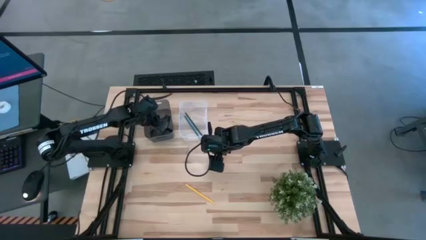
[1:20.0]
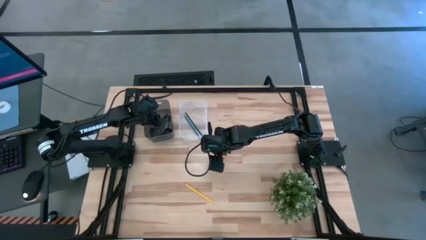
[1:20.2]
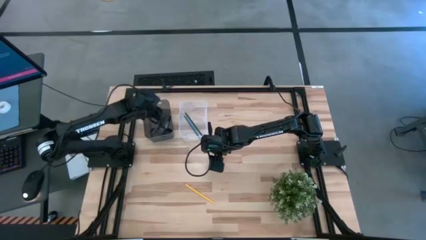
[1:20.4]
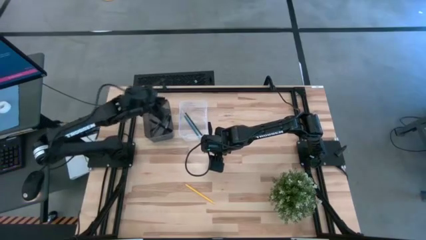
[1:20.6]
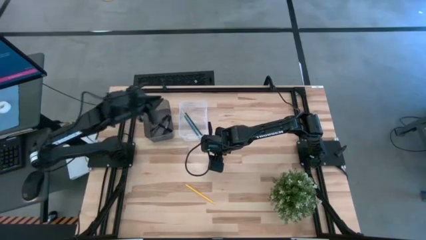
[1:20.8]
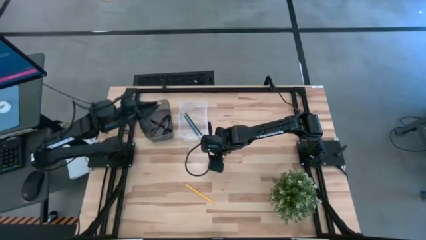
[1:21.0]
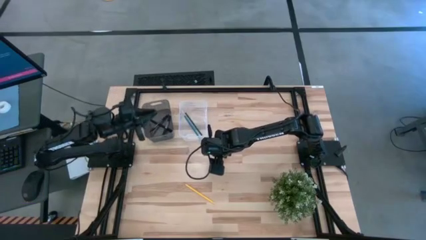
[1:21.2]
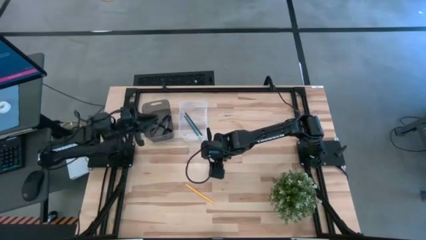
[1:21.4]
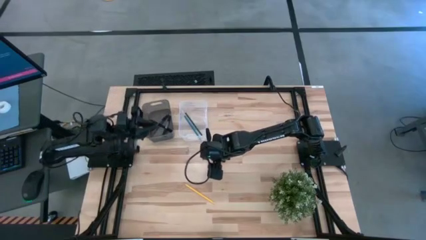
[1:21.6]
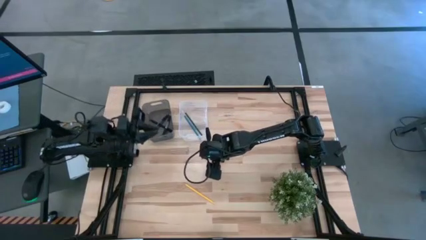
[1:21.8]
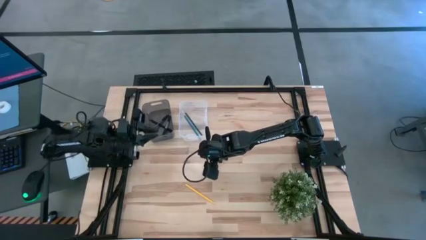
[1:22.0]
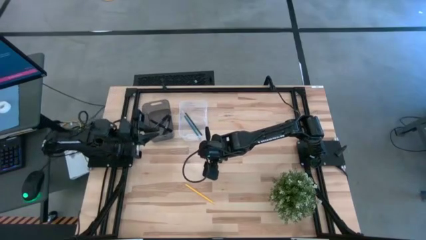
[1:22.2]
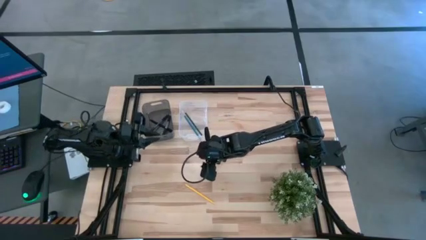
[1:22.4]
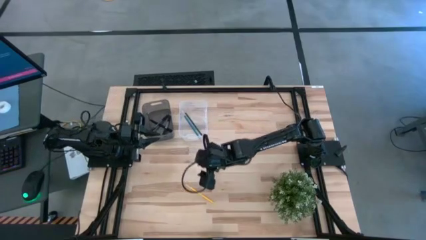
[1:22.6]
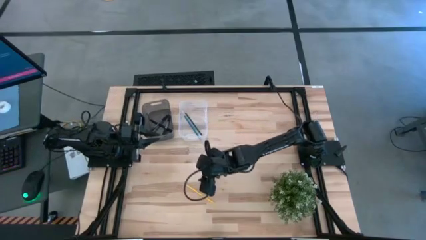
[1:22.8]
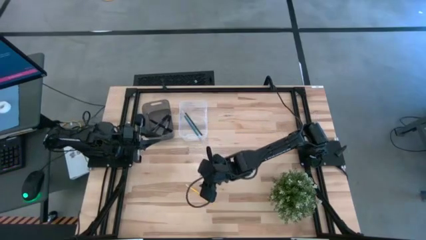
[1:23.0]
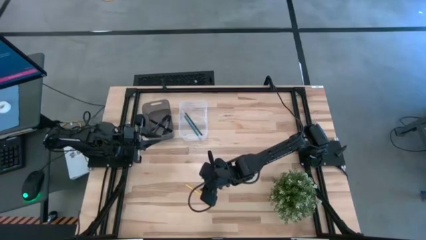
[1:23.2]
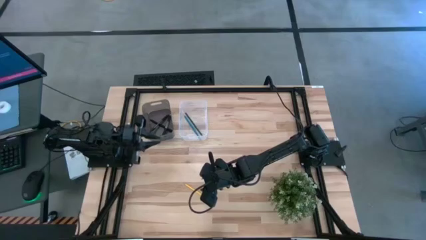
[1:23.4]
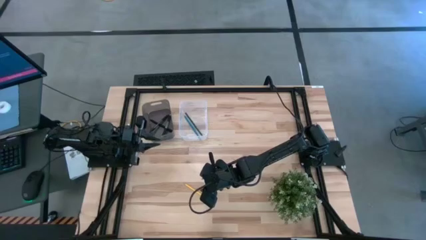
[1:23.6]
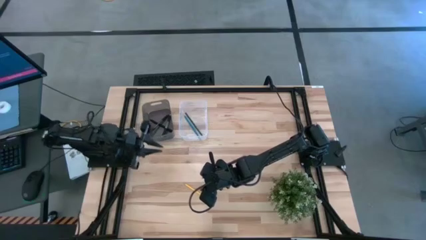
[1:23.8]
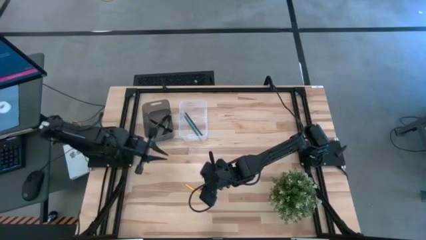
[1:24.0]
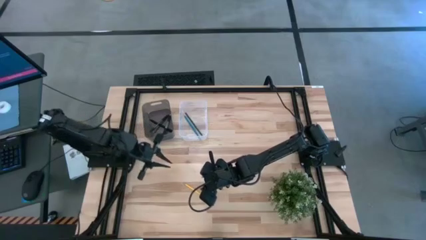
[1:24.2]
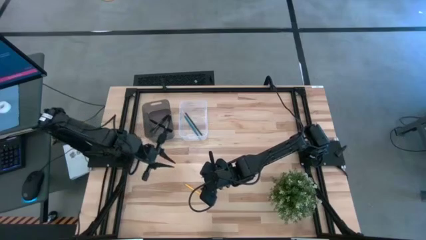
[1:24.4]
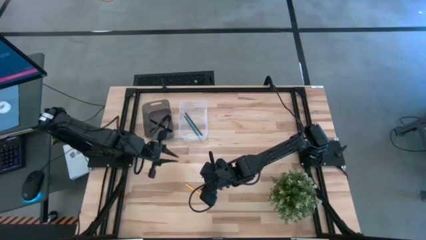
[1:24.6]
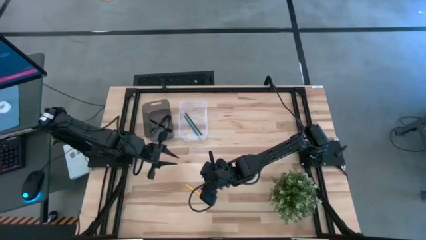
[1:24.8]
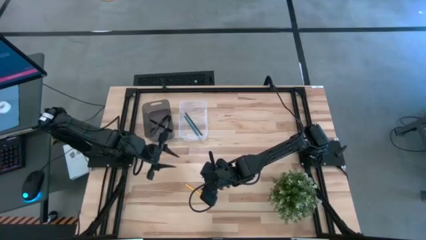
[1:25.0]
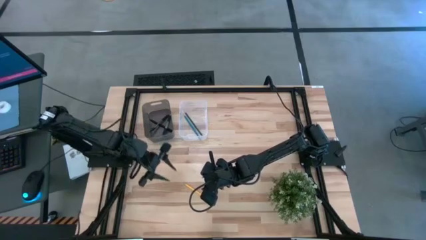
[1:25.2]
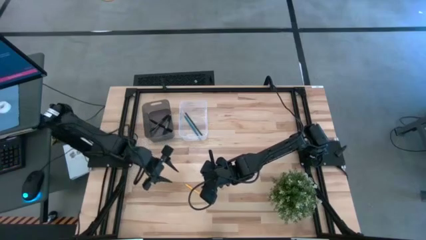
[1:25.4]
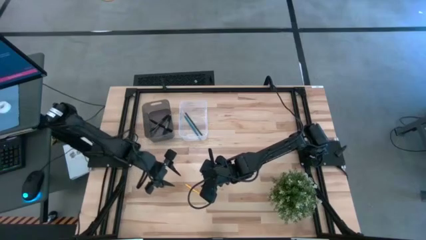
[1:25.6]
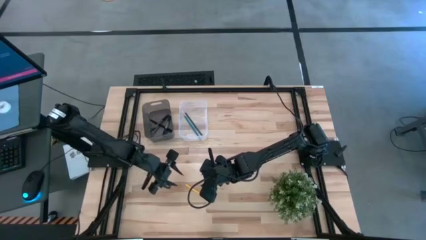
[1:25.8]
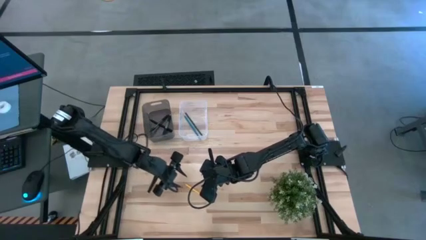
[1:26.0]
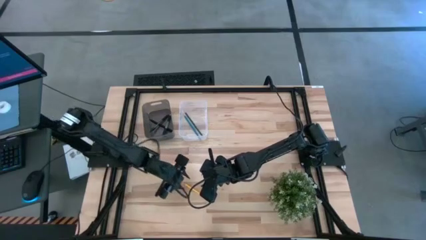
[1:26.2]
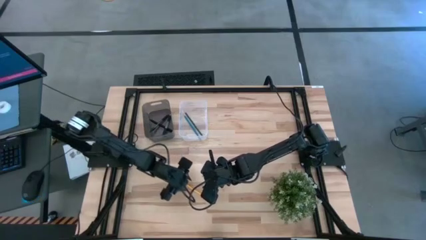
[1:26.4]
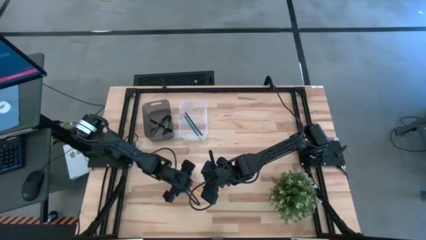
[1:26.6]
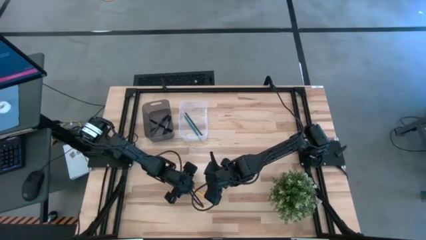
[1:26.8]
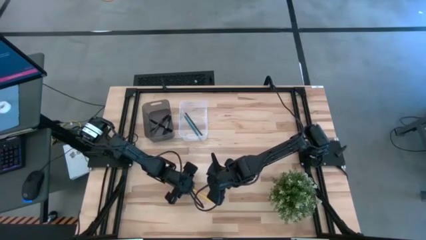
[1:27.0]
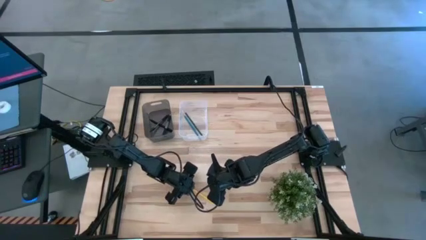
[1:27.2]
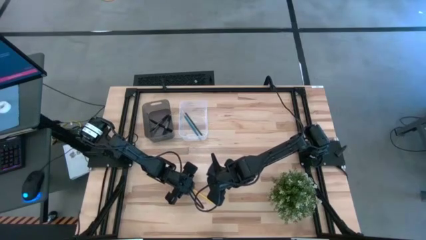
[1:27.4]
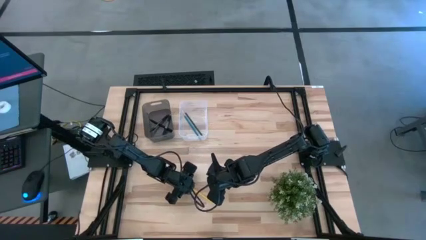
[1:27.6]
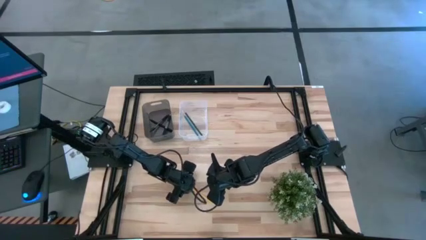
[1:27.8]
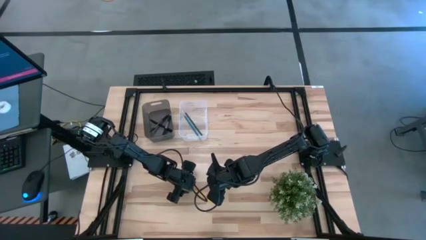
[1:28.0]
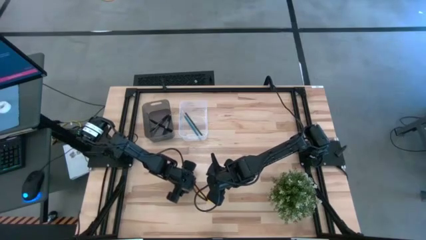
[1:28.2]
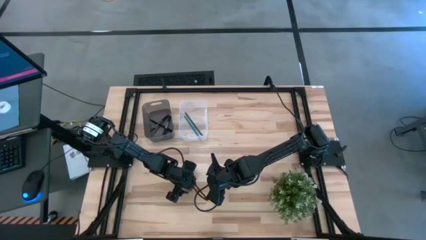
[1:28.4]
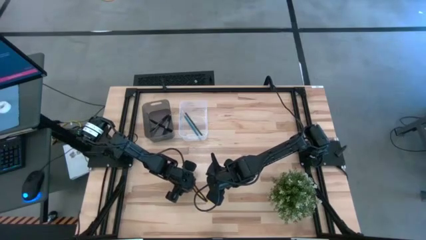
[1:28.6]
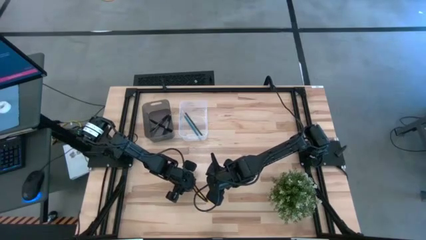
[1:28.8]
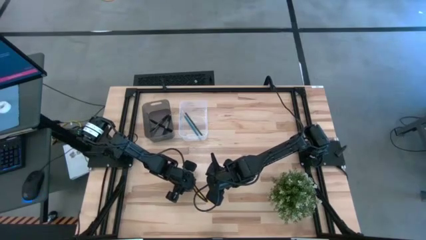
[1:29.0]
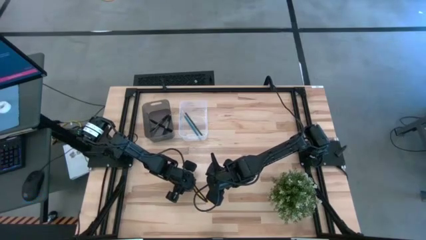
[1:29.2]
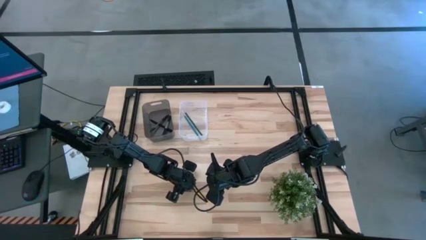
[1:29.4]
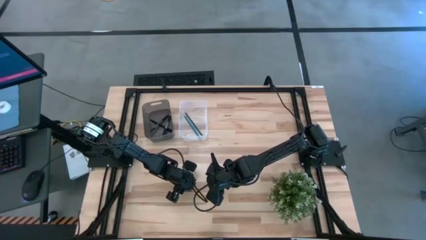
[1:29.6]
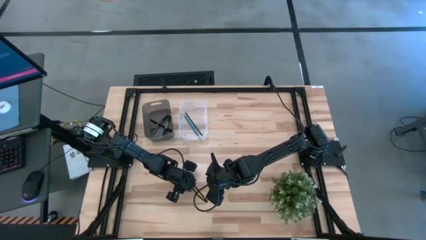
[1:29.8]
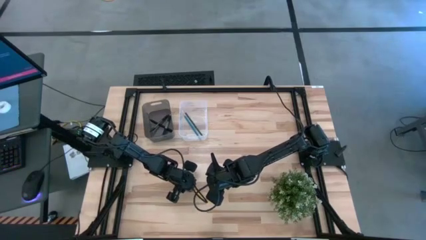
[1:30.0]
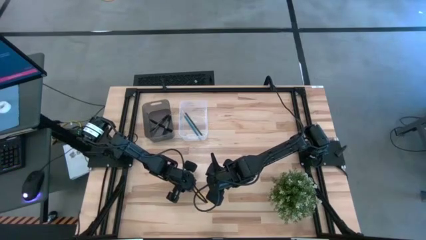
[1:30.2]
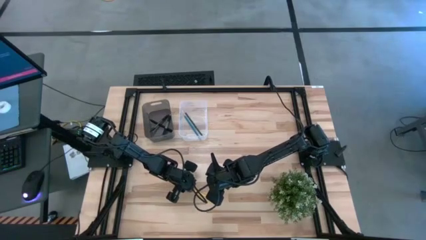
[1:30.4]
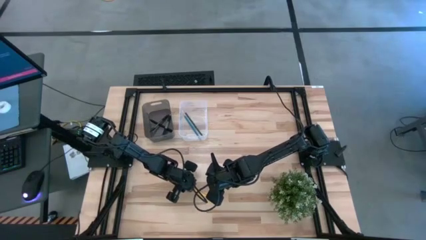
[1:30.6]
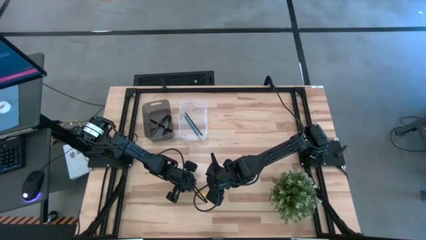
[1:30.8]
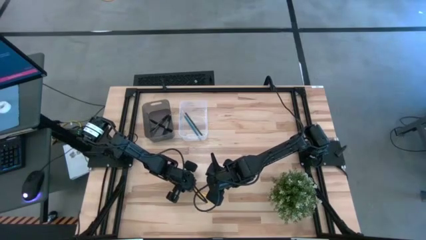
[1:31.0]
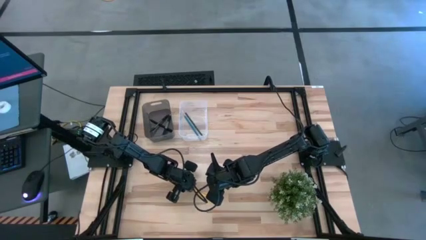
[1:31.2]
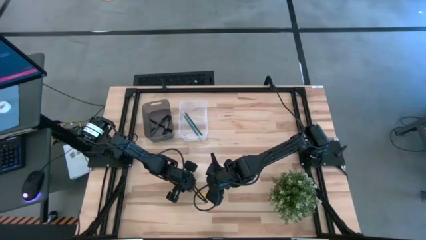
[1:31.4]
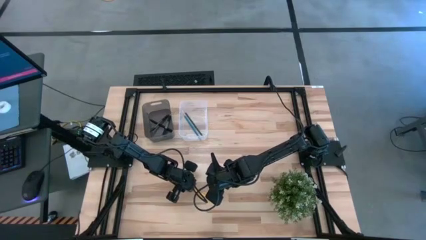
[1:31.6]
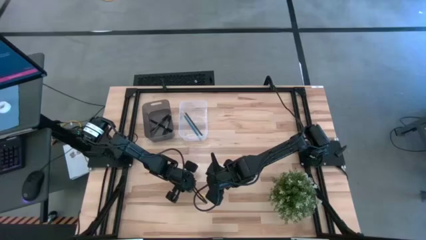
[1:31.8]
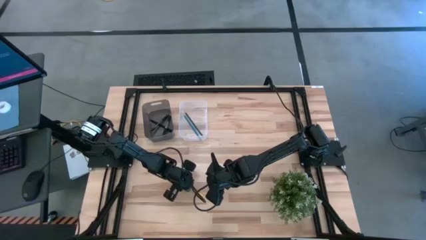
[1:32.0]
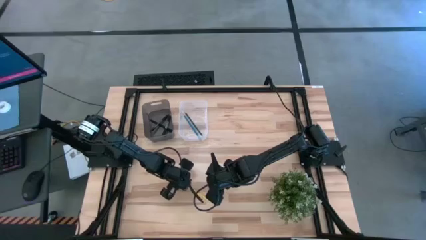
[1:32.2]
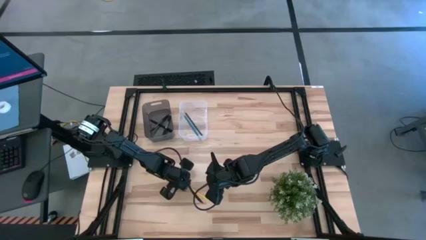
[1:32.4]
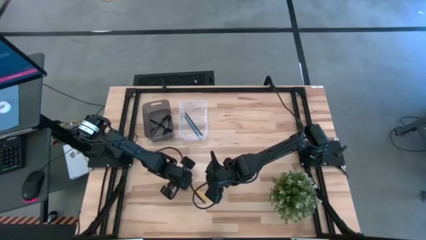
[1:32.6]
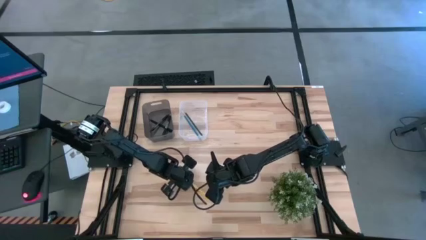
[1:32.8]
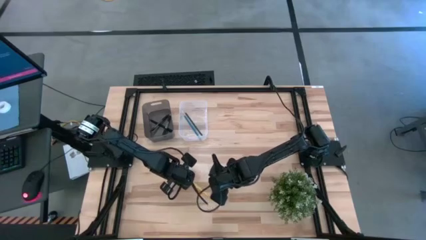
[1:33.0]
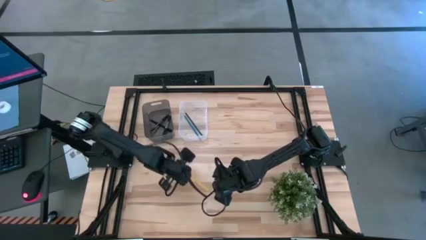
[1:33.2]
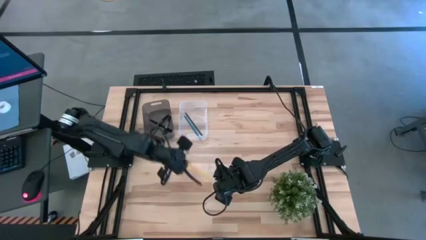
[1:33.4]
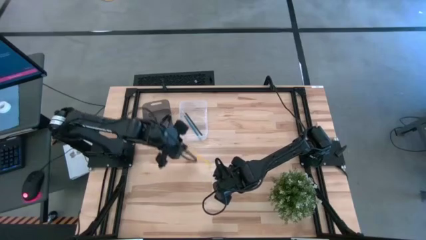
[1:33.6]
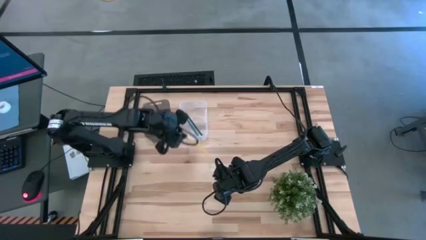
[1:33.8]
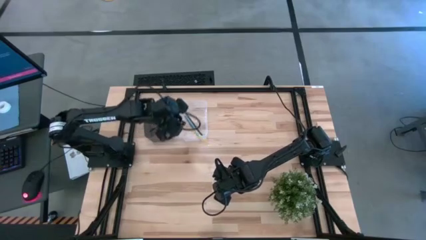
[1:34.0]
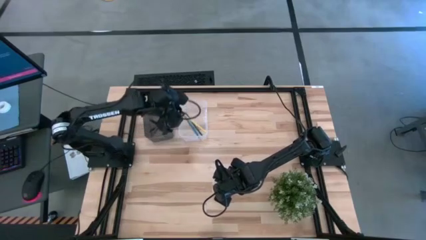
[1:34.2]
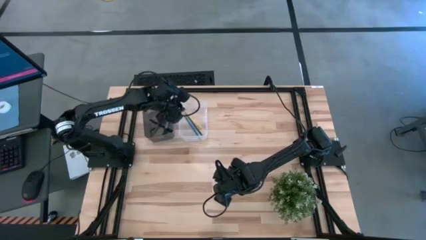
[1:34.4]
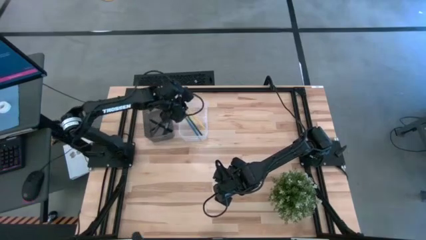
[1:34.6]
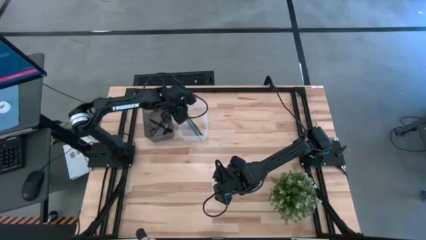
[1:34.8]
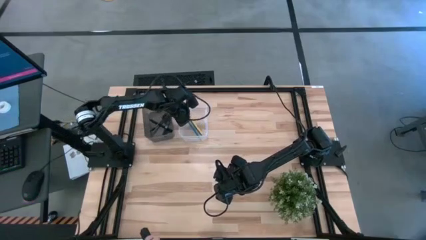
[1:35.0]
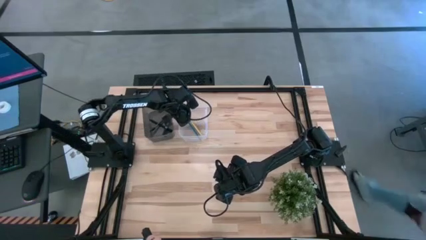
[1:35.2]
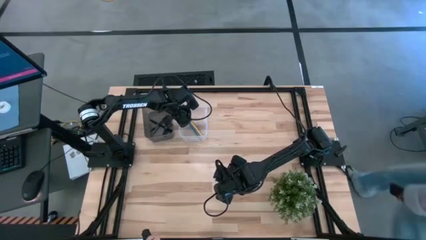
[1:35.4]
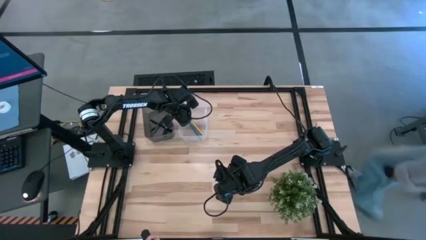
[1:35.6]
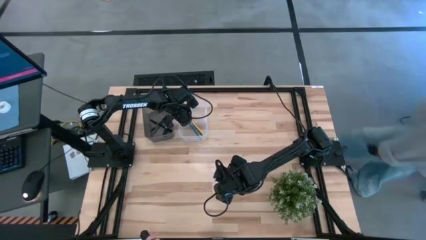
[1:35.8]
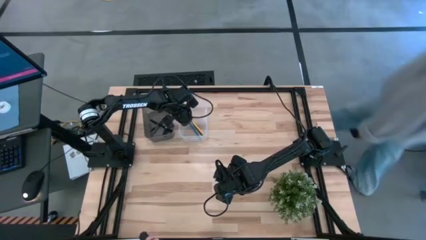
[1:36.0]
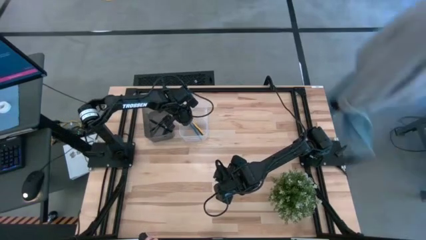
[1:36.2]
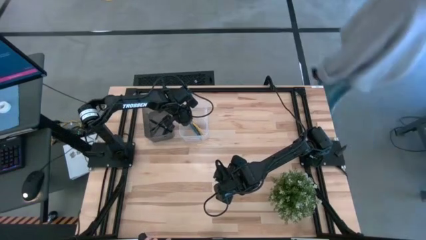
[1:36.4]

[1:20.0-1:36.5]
Task: Sort pens & pencils
Put the yellow pencil into the transparent bin
